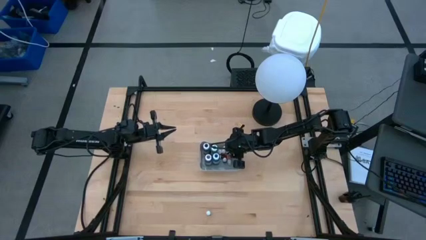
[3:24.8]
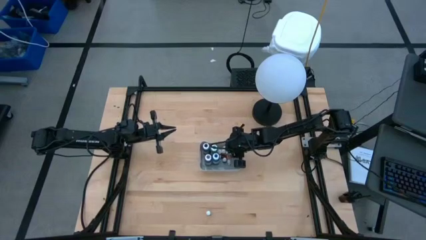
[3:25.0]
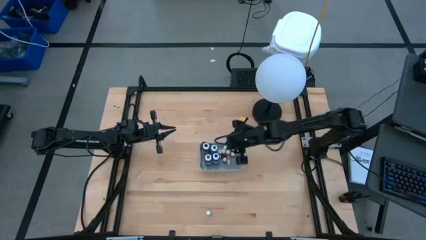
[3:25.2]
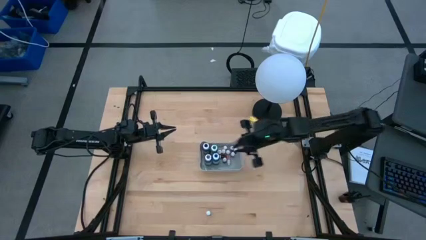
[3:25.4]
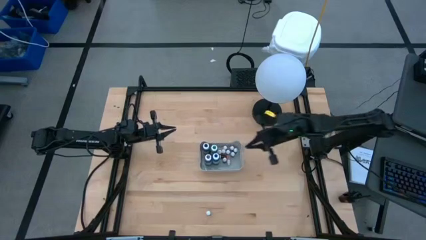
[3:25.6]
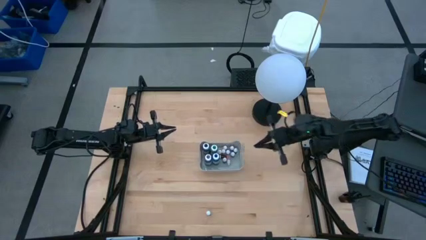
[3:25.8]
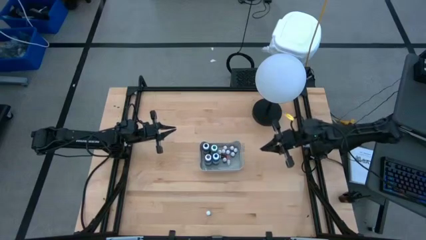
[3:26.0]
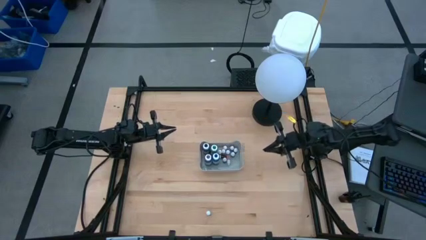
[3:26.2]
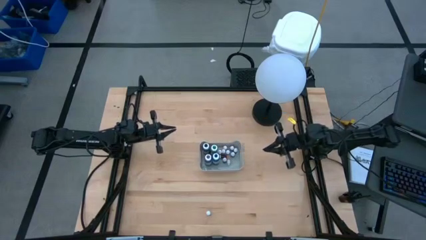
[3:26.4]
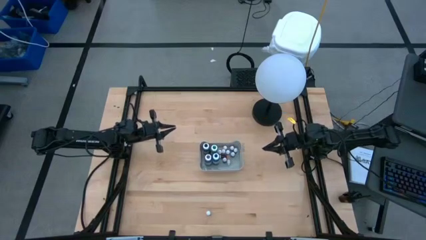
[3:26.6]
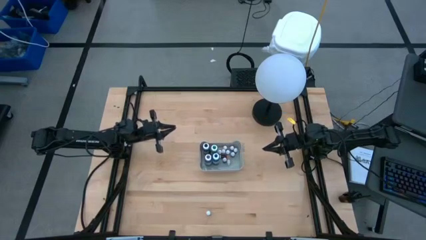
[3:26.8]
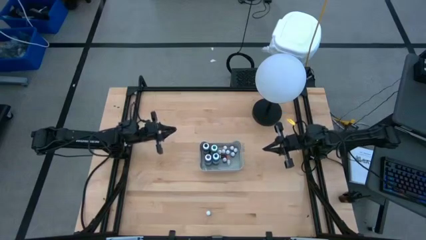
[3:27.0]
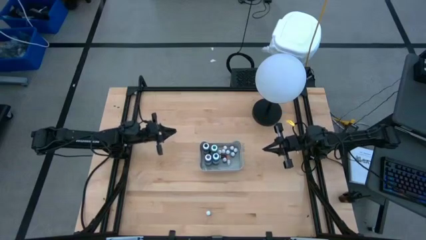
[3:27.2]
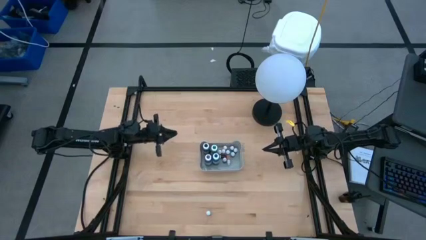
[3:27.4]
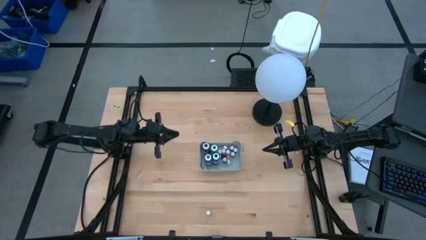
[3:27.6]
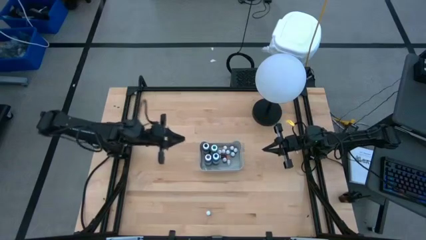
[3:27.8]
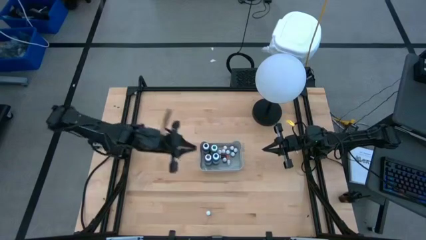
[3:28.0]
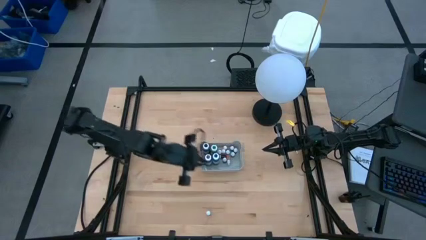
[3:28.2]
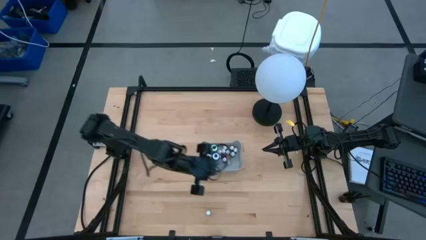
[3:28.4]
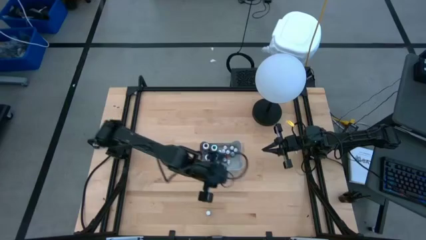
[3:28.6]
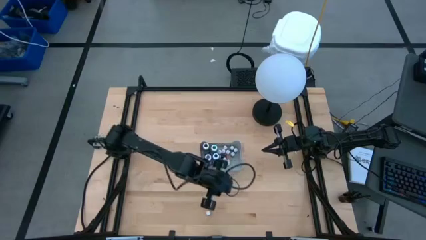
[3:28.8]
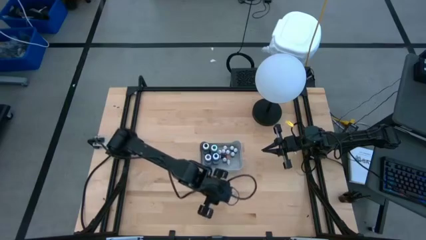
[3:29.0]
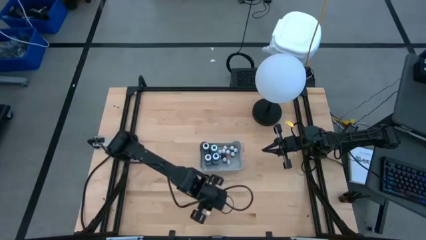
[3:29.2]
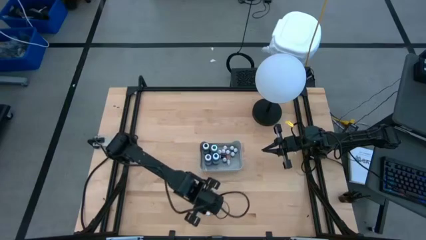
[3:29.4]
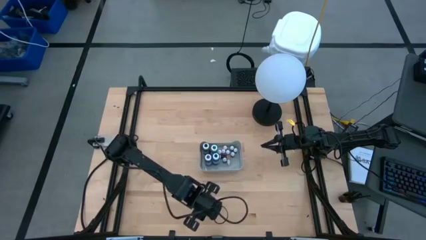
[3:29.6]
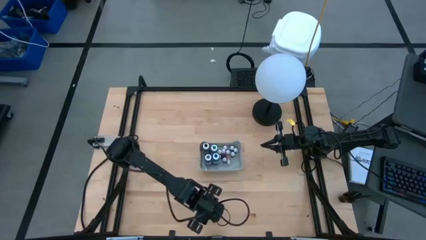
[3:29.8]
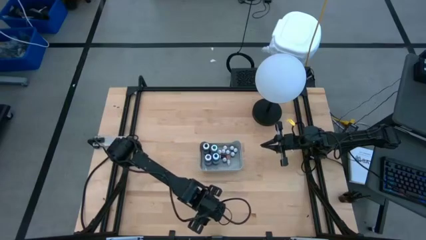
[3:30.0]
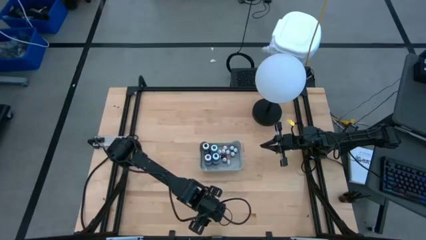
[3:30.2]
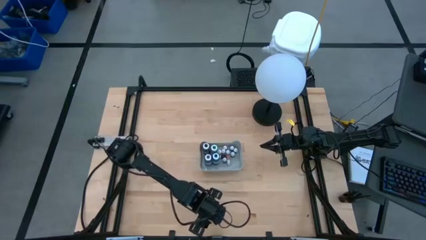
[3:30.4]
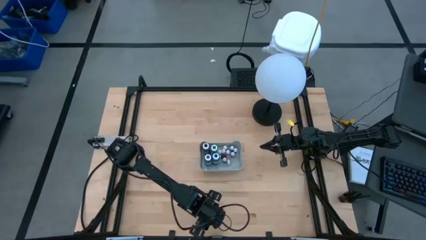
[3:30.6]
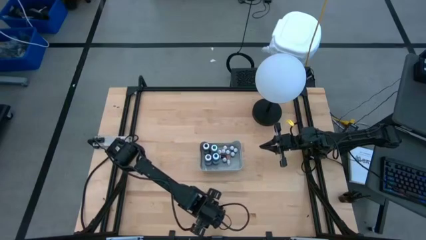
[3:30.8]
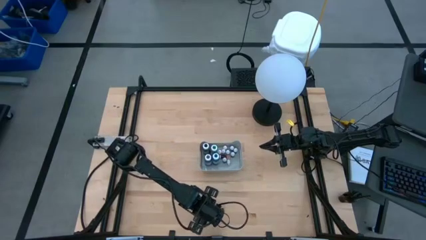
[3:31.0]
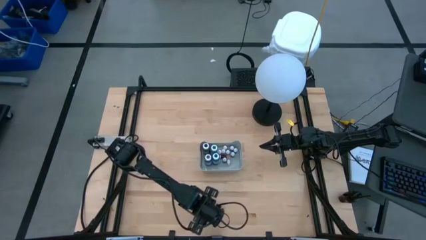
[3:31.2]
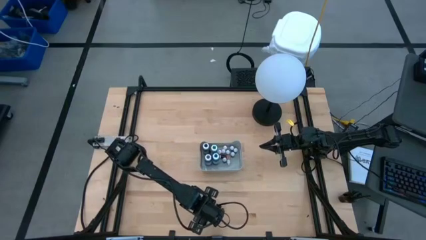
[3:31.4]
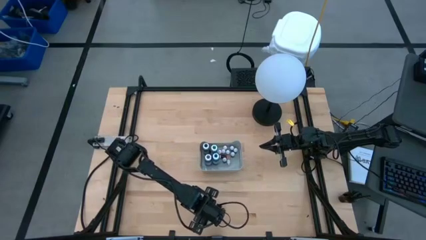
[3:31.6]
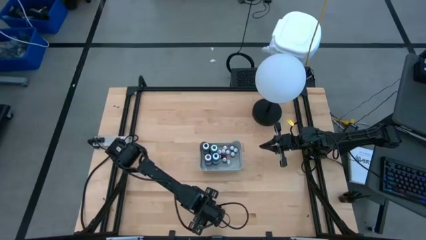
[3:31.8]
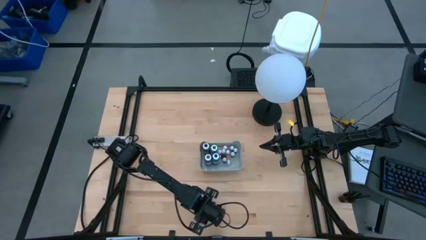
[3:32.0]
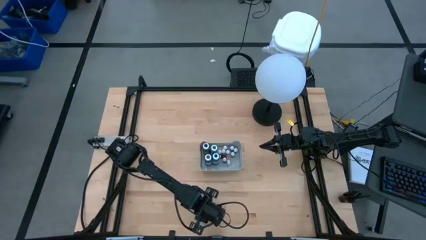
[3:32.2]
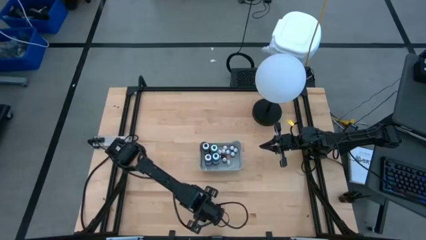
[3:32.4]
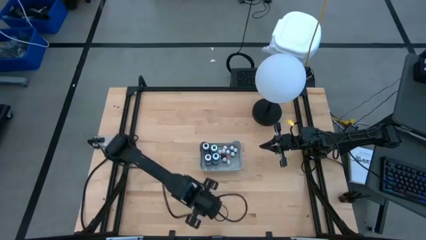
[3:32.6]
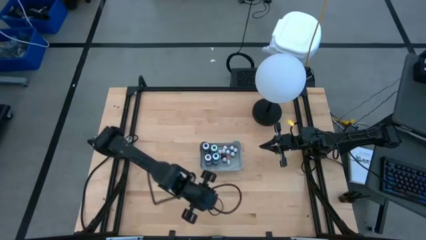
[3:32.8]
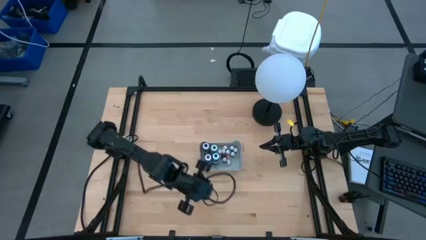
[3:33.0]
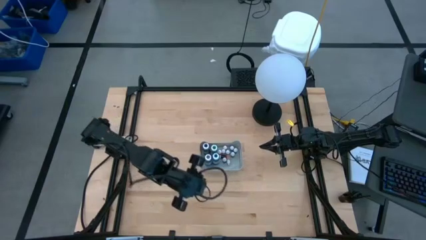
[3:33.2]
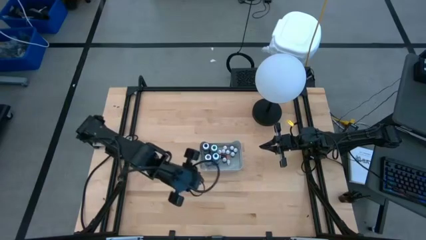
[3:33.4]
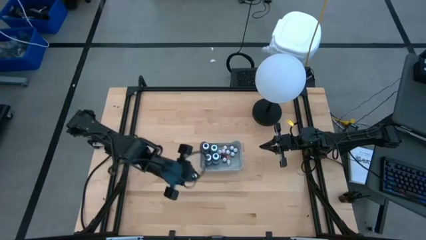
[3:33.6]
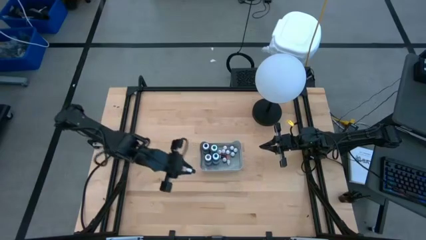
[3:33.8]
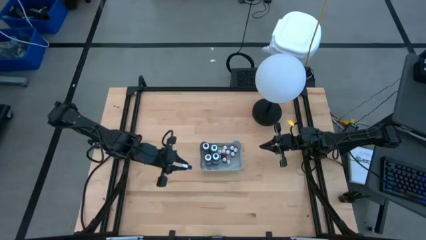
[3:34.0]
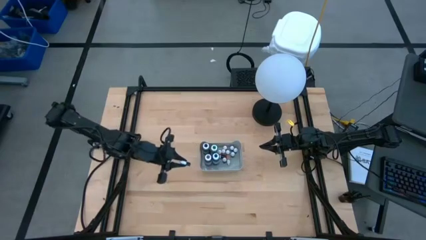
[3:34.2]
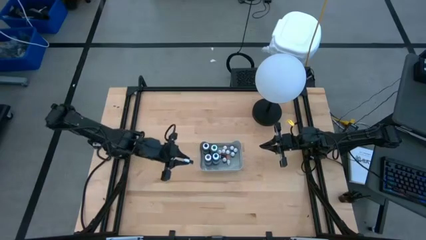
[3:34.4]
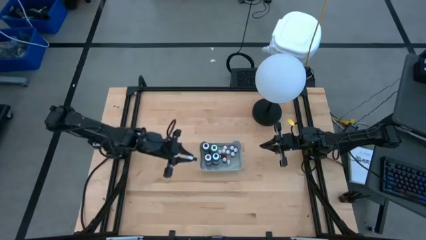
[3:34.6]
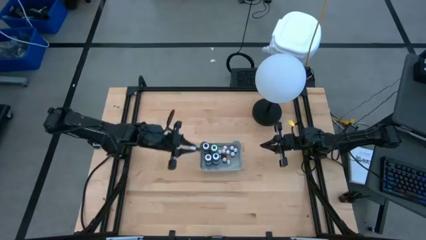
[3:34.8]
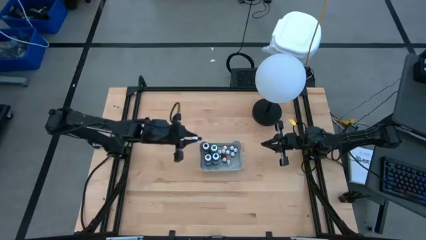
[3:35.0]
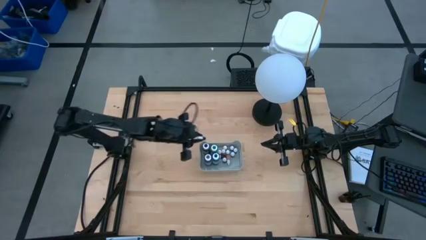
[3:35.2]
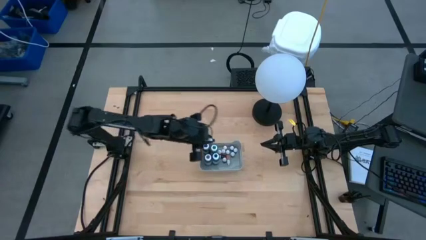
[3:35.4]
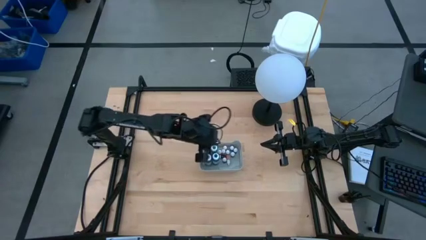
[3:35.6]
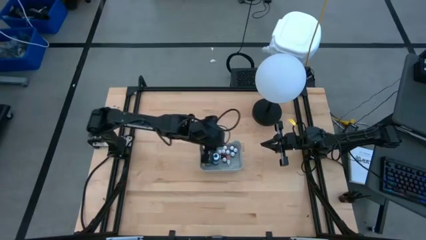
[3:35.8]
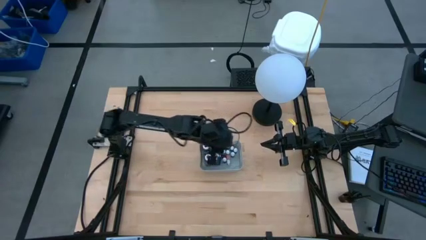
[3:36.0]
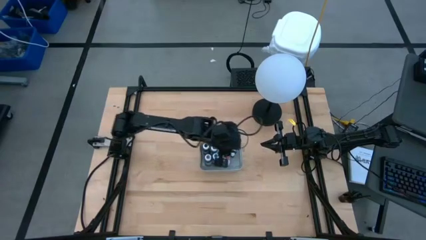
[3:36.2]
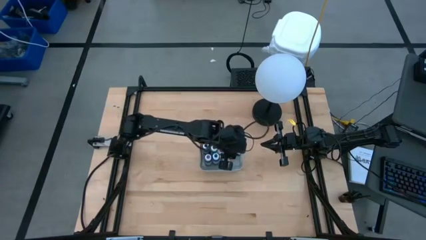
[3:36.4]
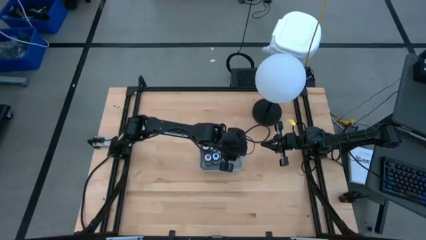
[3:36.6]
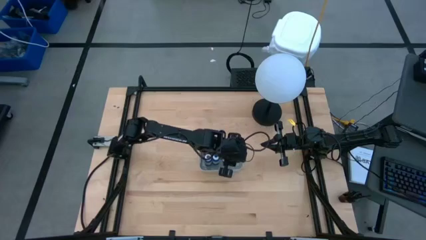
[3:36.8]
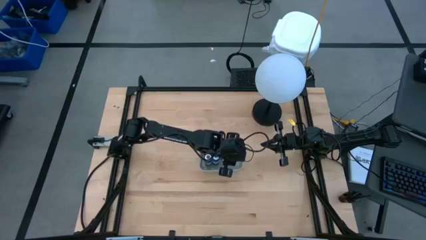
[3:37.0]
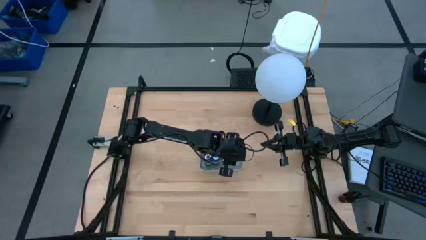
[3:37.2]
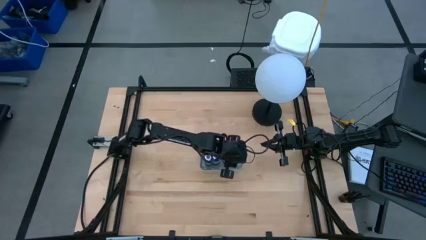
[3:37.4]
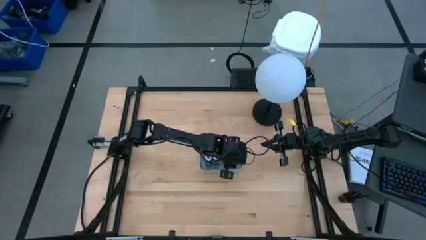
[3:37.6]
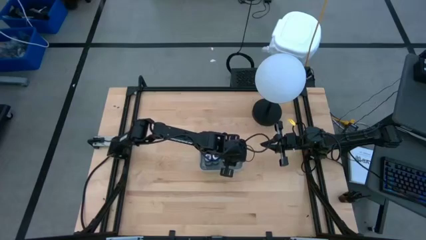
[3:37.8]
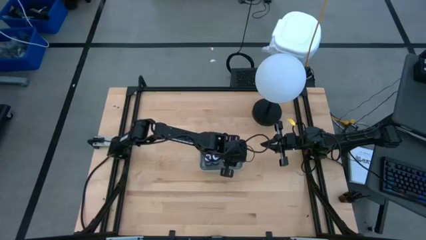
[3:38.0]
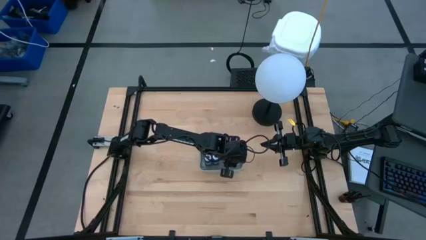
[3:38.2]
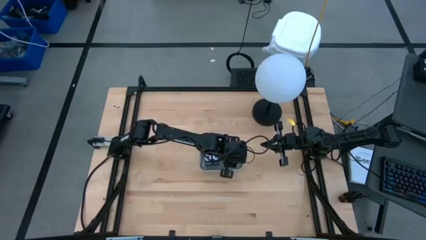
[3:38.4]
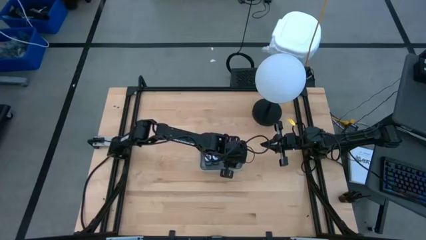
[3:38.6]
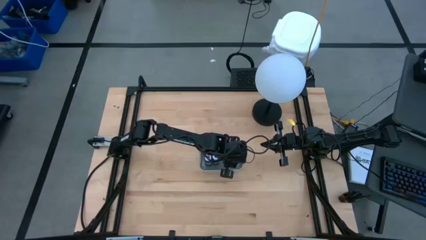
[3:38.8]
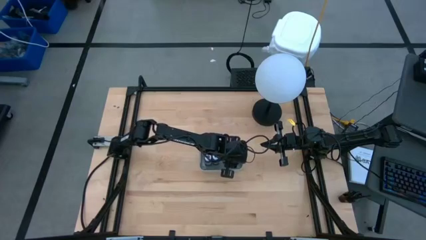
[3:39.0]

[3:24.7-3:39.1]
Task: Pick & Place food coloring
Put the small blue food coloring bottle into the gray bin
